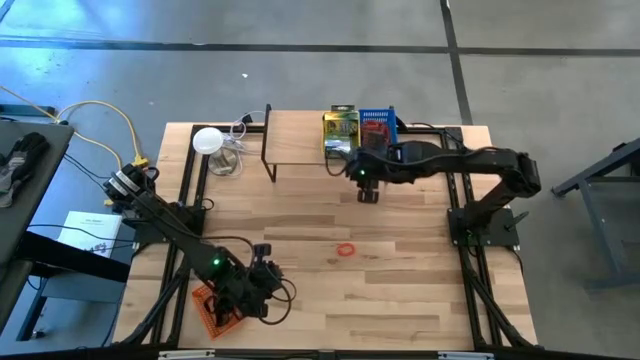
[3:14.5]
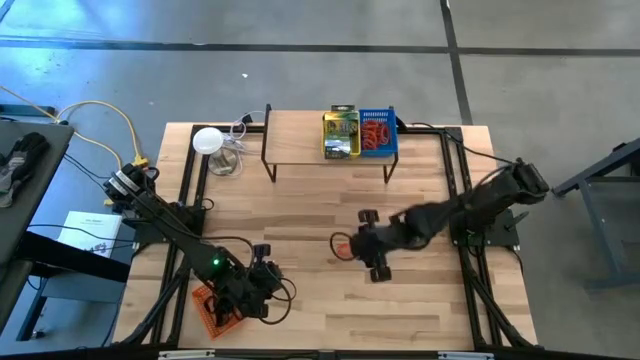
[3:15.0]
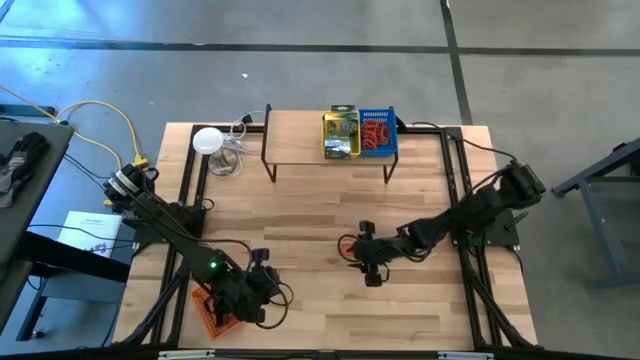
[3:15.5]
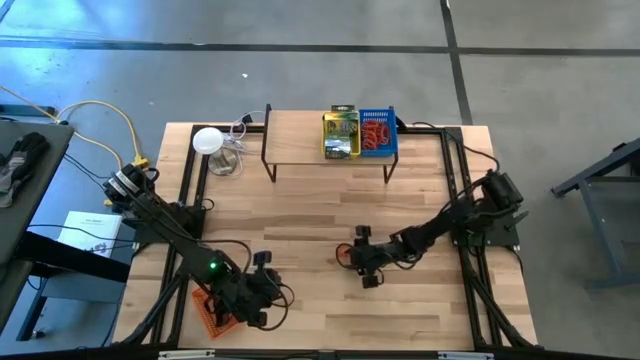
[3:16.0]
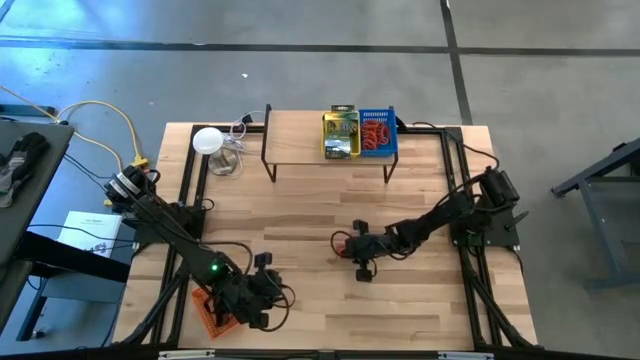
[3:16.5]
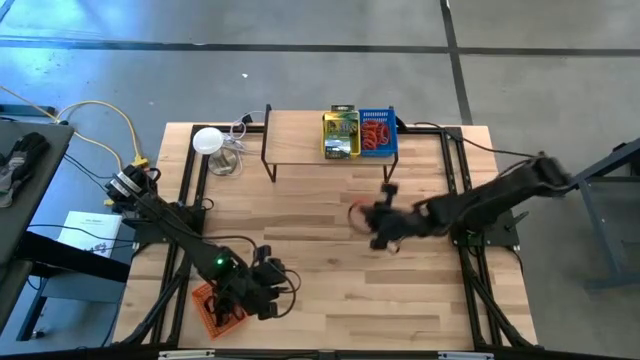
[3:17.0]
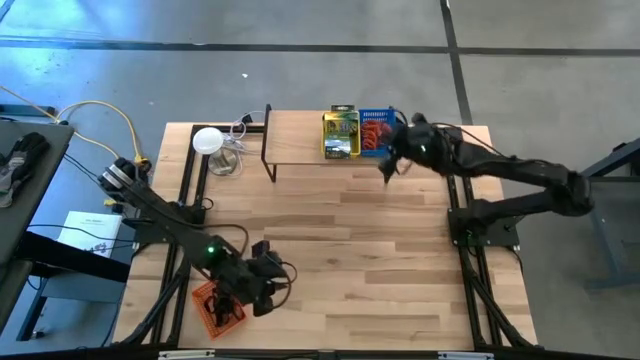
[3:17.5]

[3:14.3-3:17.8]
Task: Pick & Place Office Desk Supplies
Put the orange spring keychain into the blue bin on the shelf

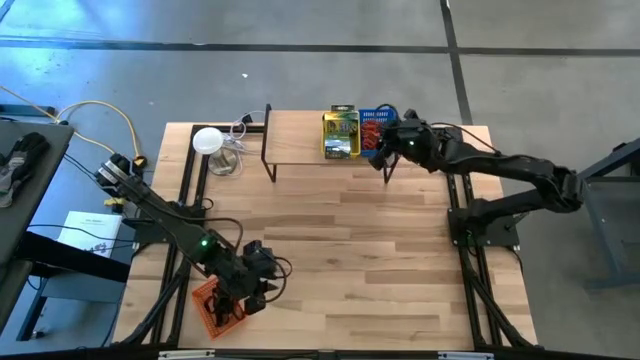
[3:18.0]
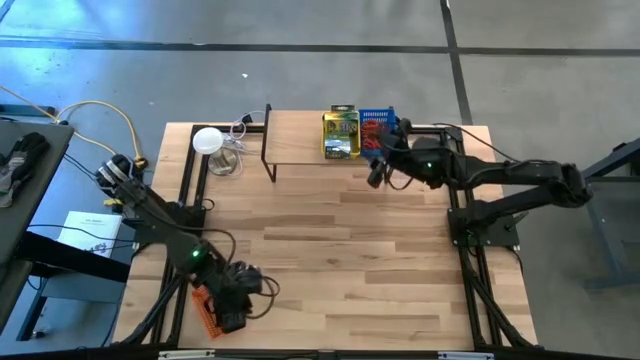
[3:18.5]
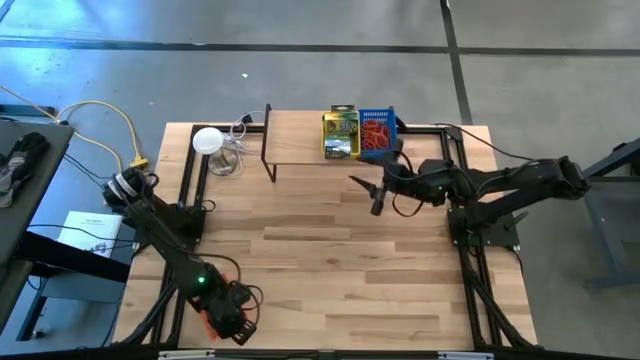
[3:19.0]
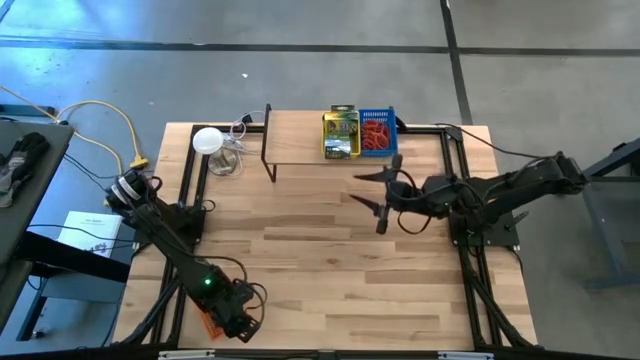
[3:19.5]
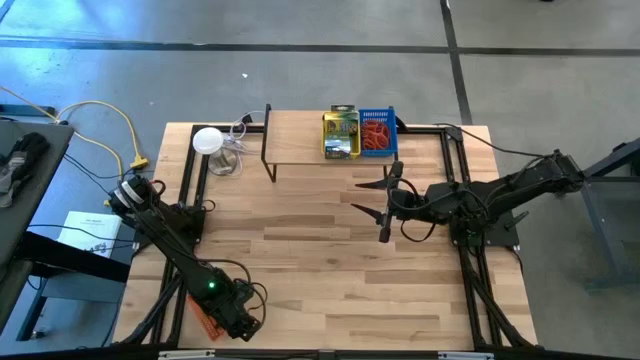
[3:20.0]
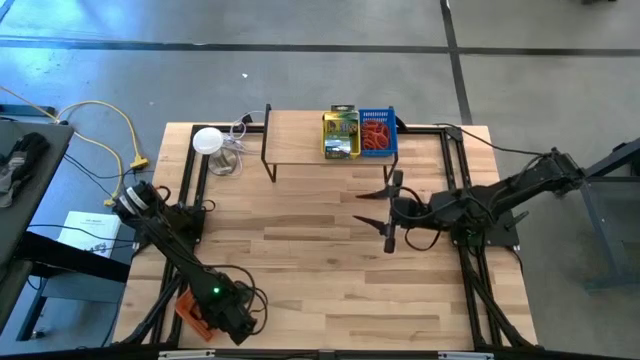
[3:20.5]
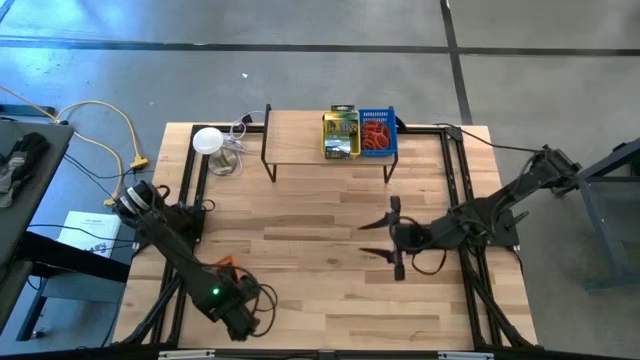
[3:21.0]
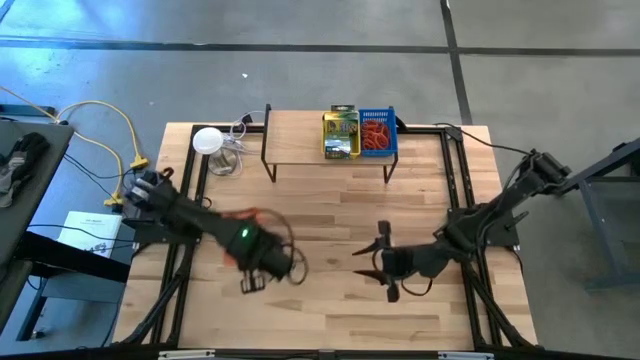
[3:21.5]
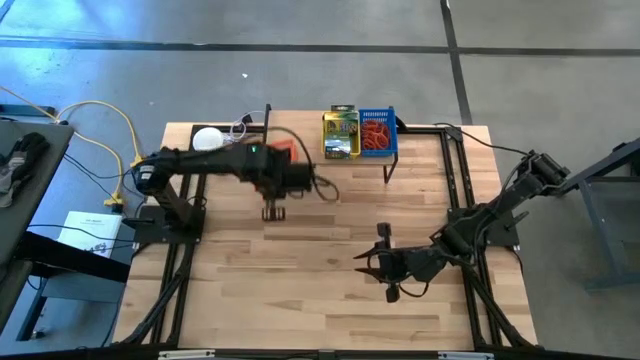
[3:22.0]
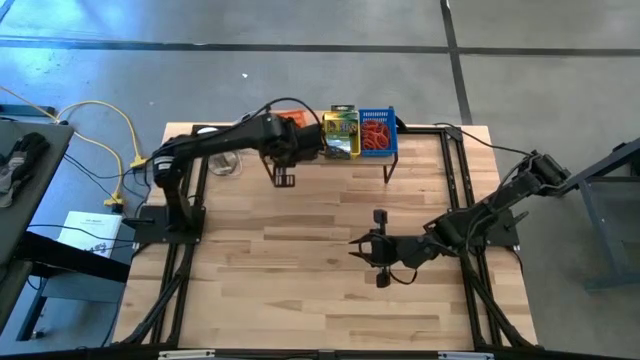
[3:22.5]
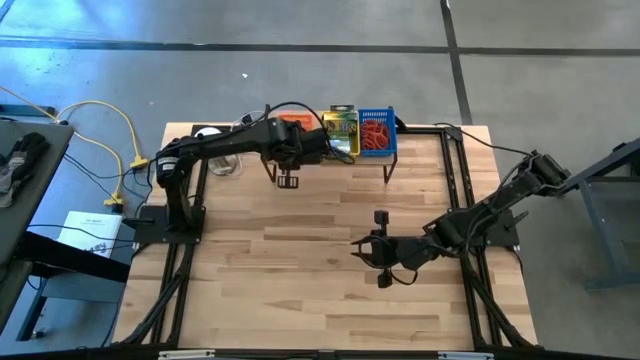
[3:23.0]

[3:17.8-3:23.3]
Put the orange bin with the black rubber bands on the shelf

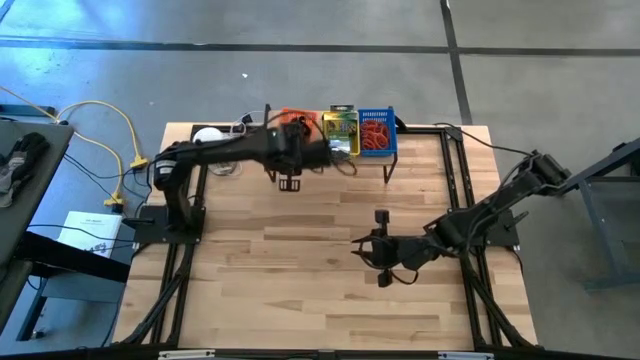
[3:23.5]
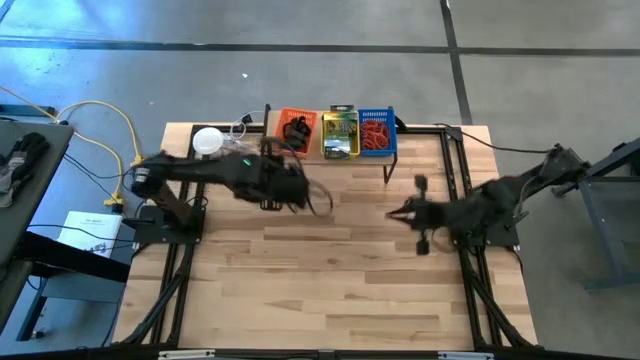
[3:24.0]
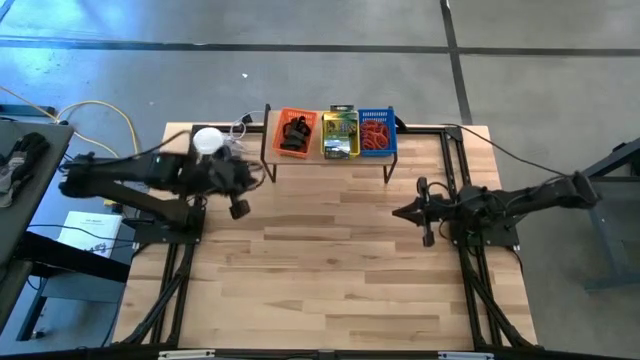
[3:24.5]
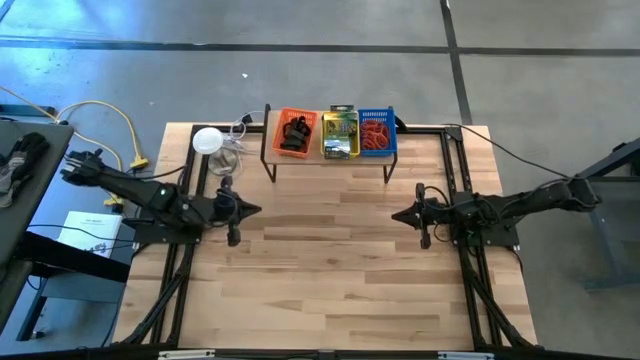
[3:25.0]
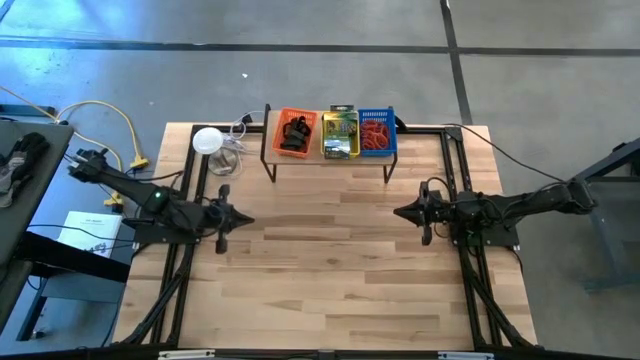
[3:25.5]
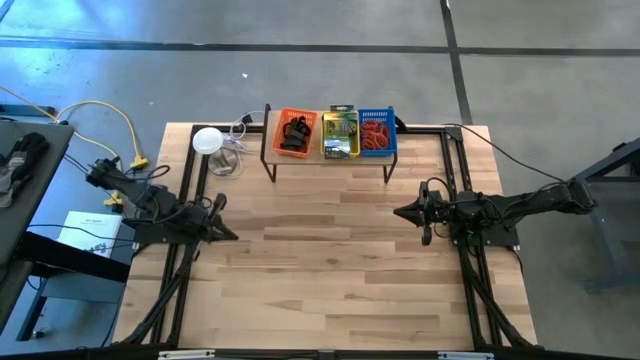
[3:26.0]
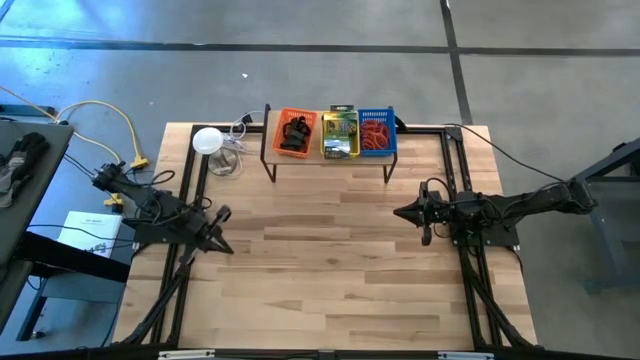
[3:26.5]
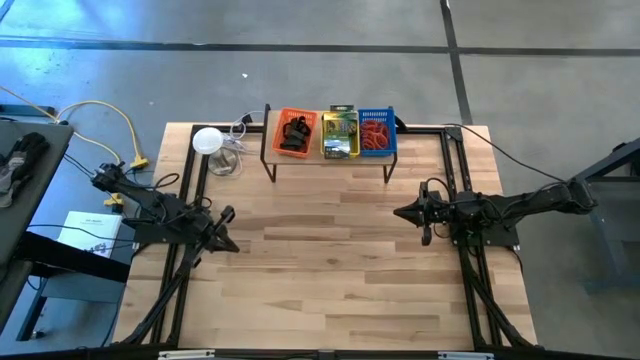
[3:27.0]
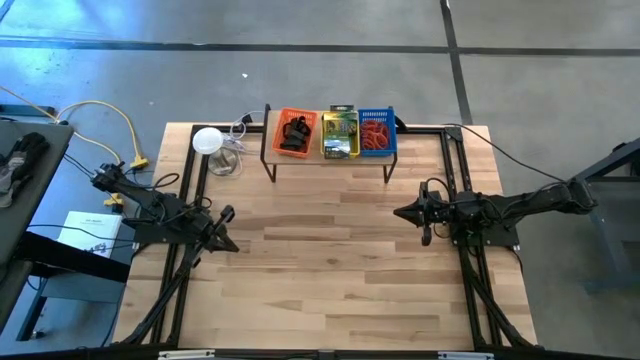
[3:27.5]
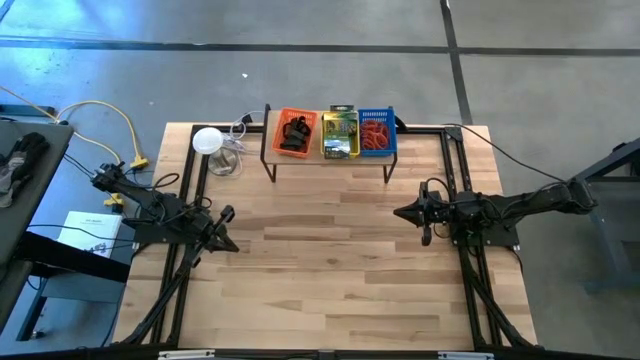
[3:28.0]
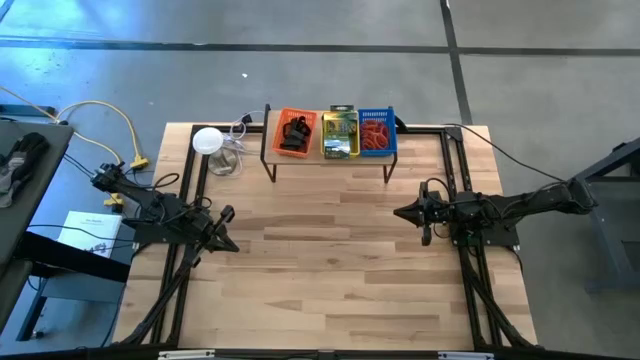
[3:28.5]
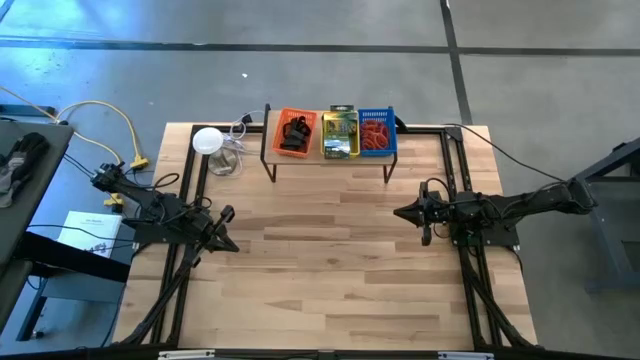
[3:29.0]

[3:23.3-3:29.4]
Return to Home Position

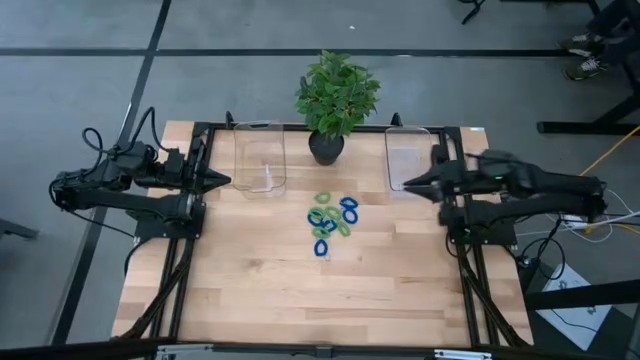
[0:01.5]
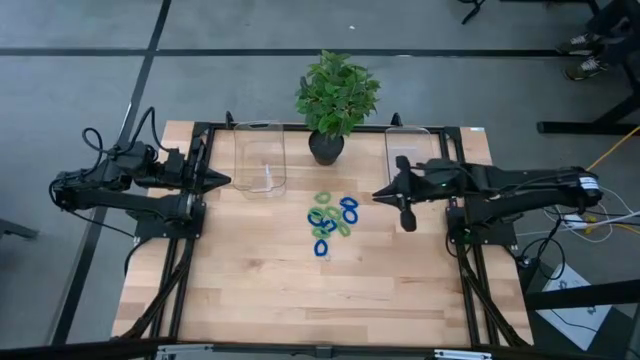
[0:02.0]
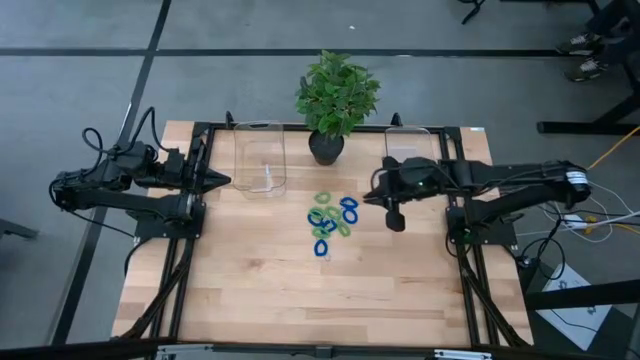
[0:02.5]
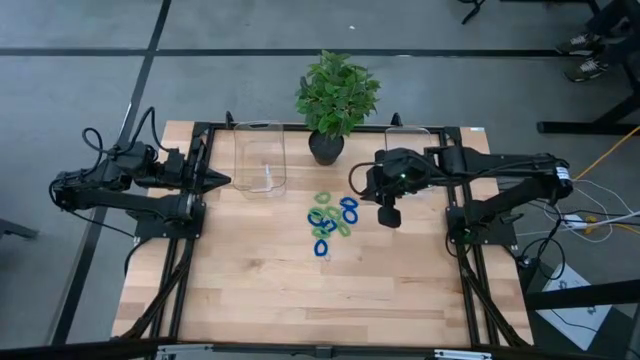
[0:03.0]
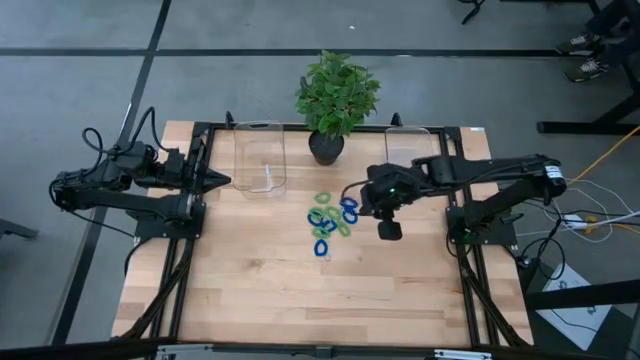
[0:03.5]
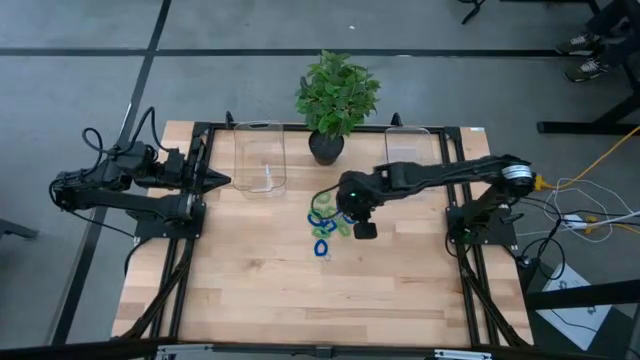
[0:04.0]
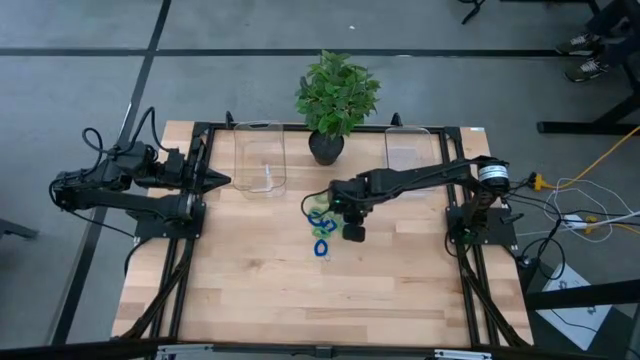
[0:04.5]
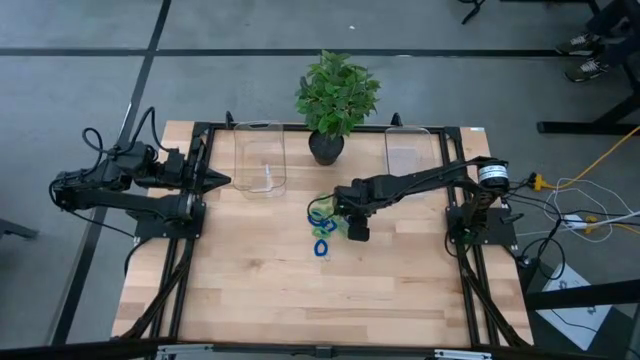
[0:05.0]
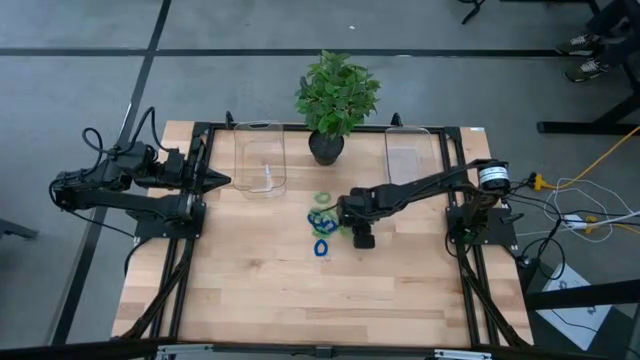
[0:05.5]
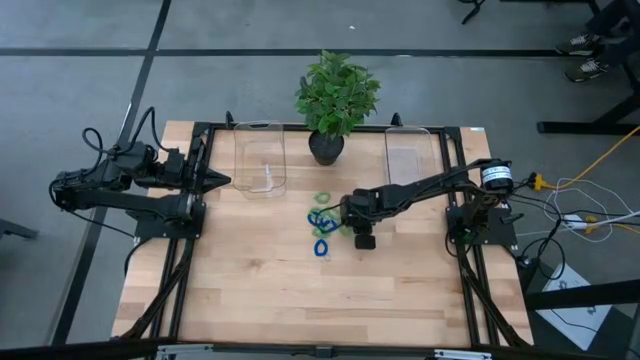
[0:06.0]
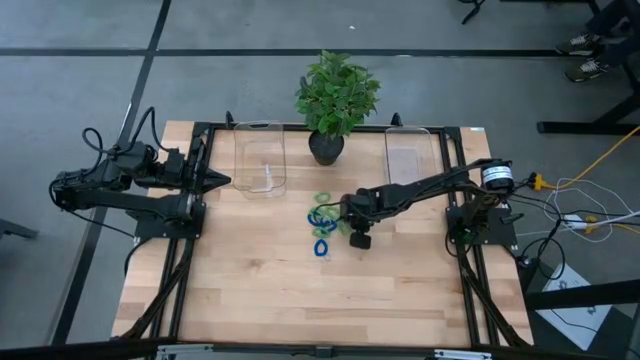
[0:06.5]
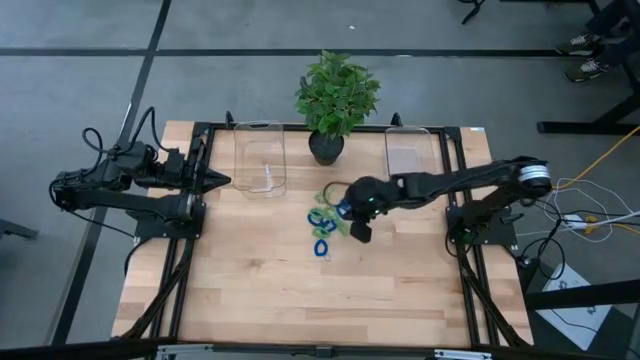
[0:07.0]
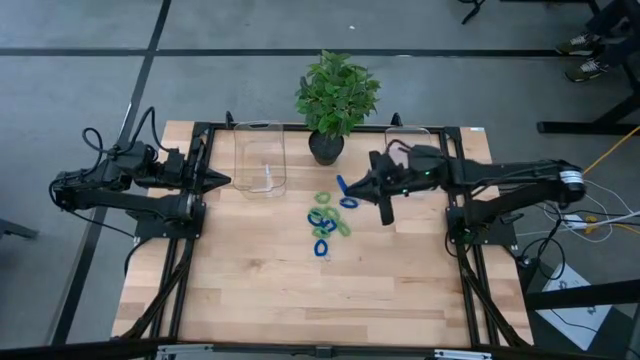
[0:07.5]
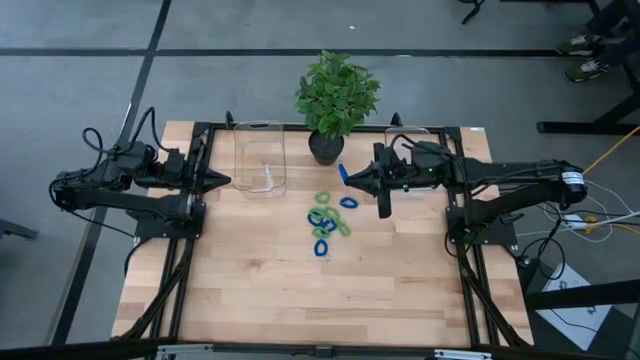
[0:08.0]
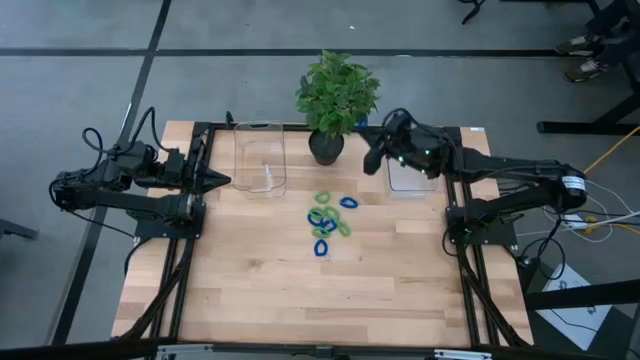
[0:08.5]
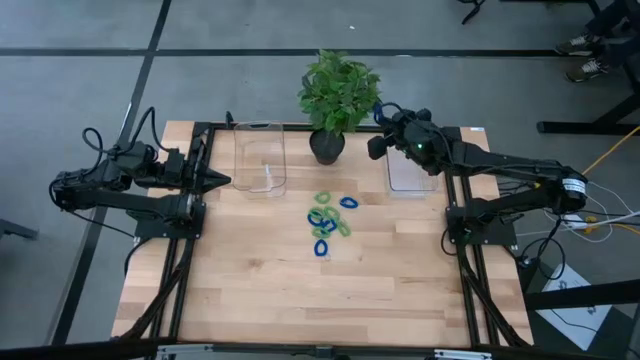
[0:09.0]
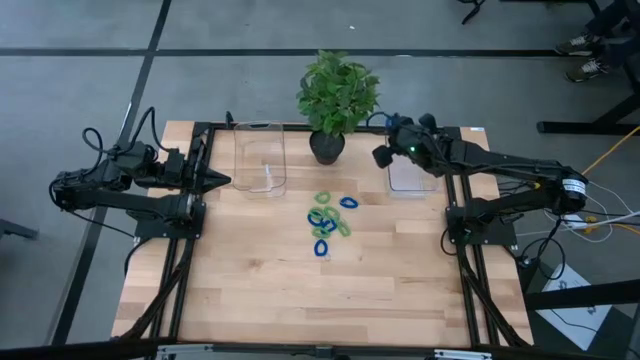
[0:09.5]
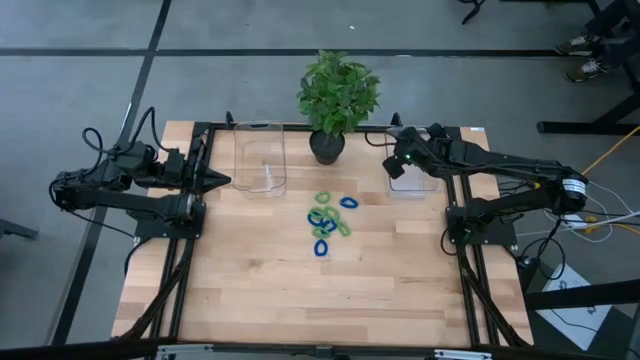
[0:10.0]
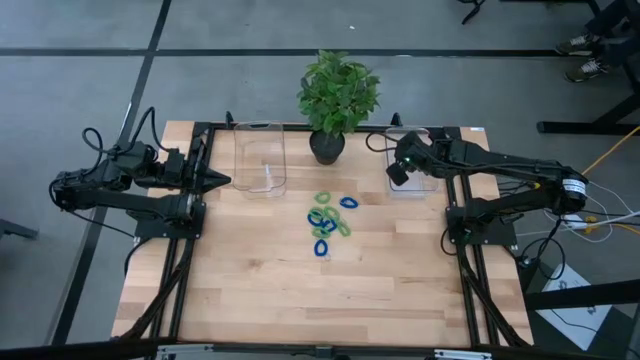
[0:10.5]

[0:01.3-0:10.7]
Task: Sort spring keychains
Put the blue spring keychain into the right transparent bin
